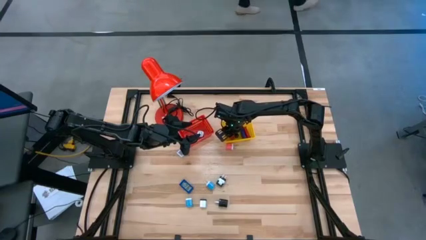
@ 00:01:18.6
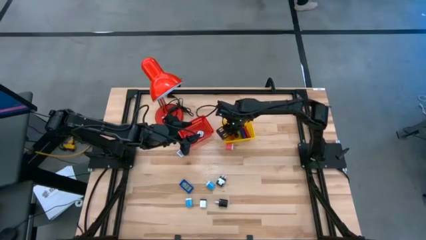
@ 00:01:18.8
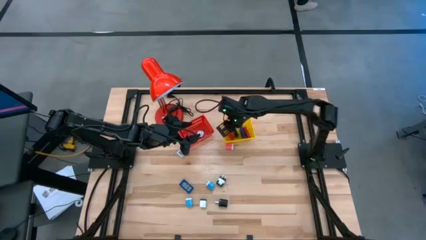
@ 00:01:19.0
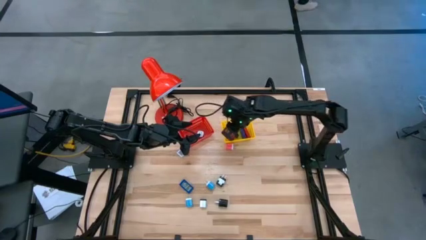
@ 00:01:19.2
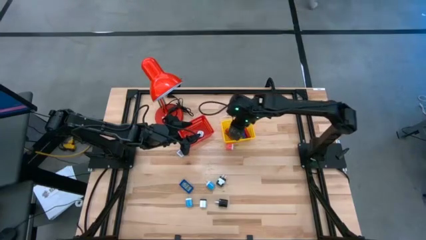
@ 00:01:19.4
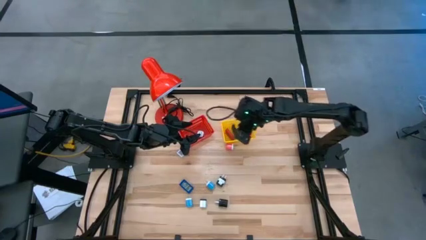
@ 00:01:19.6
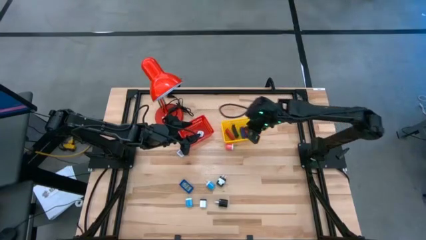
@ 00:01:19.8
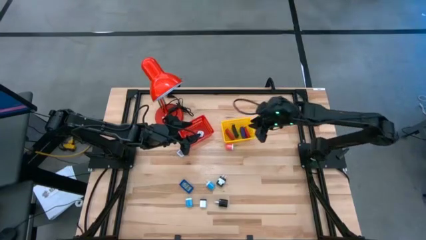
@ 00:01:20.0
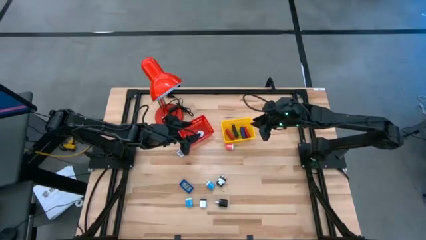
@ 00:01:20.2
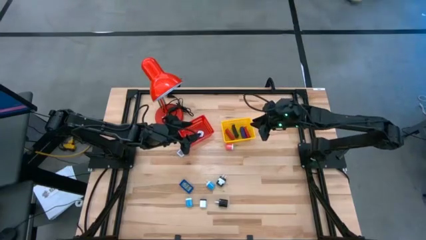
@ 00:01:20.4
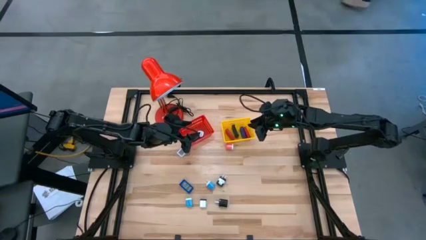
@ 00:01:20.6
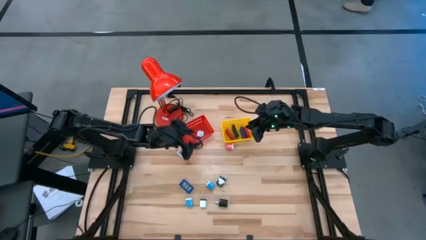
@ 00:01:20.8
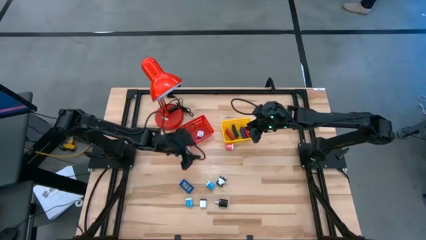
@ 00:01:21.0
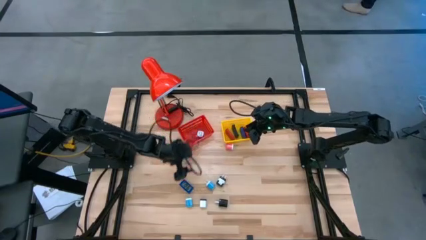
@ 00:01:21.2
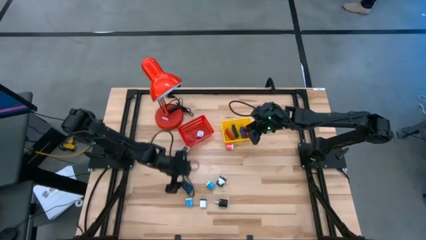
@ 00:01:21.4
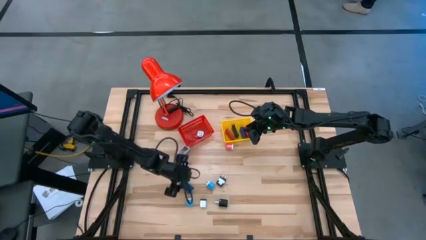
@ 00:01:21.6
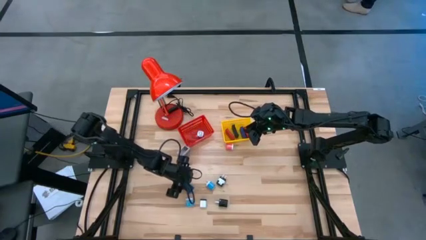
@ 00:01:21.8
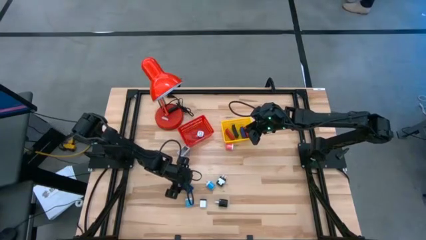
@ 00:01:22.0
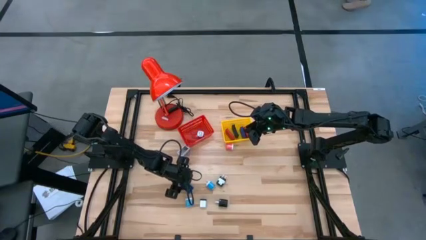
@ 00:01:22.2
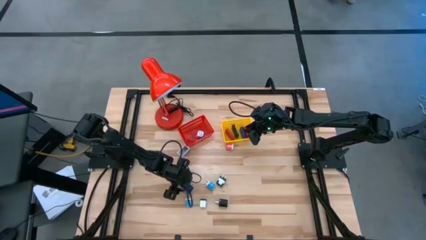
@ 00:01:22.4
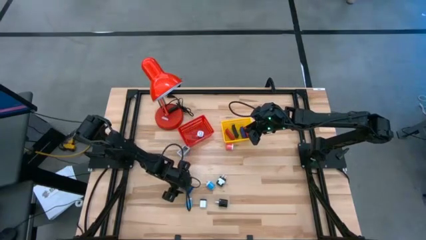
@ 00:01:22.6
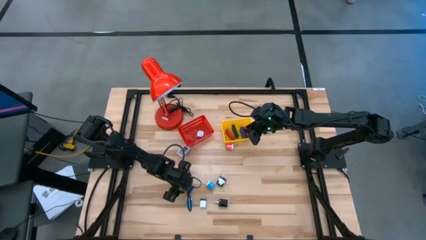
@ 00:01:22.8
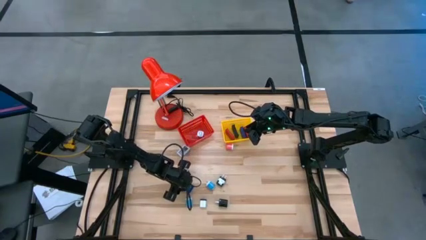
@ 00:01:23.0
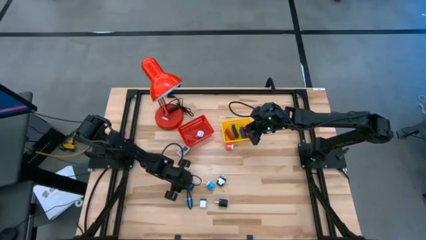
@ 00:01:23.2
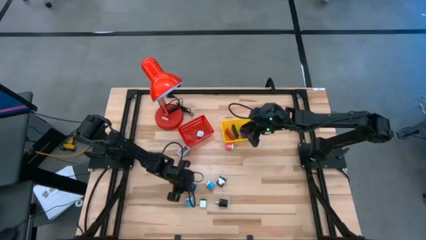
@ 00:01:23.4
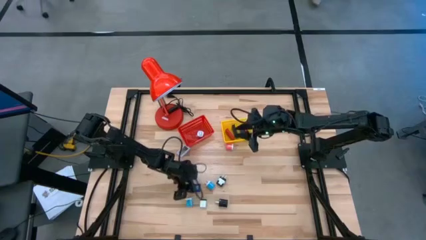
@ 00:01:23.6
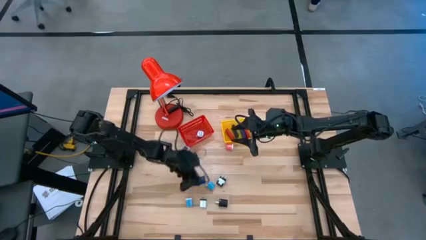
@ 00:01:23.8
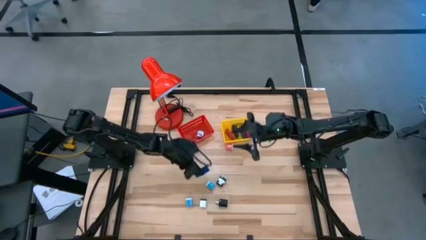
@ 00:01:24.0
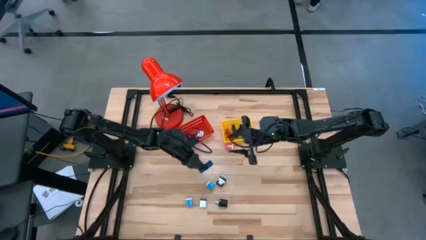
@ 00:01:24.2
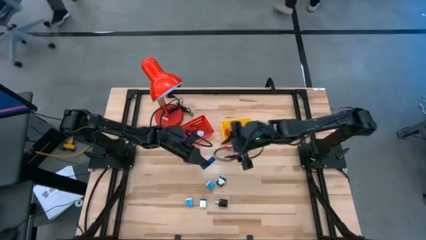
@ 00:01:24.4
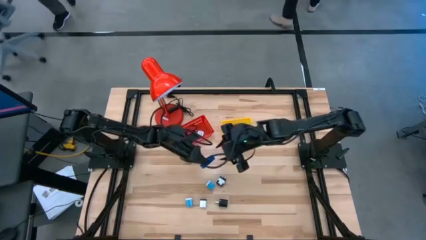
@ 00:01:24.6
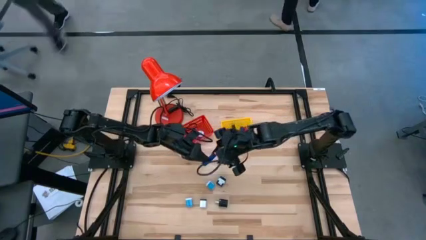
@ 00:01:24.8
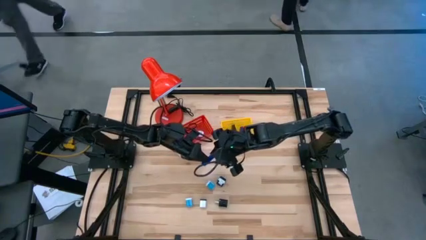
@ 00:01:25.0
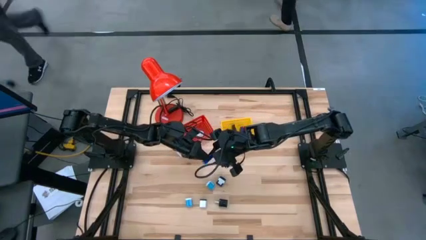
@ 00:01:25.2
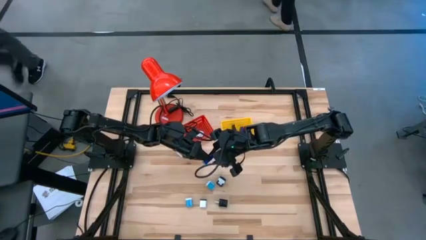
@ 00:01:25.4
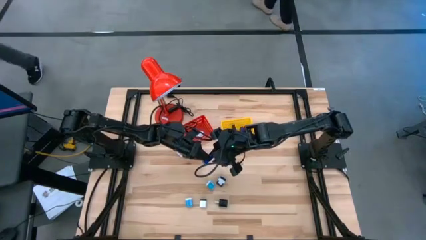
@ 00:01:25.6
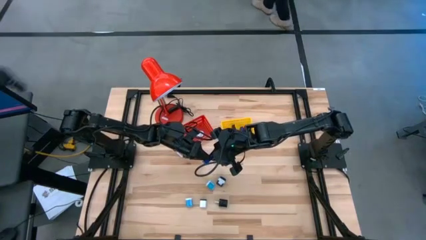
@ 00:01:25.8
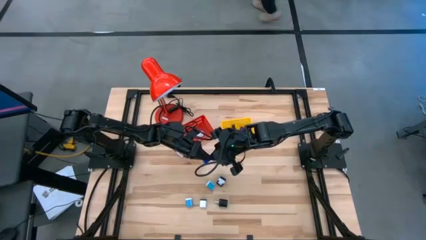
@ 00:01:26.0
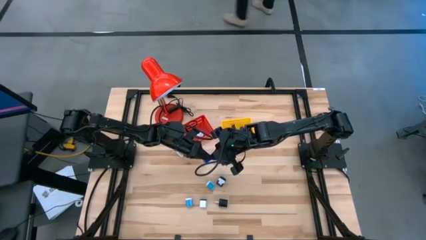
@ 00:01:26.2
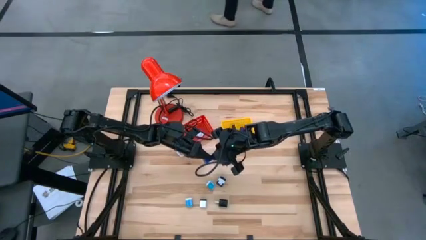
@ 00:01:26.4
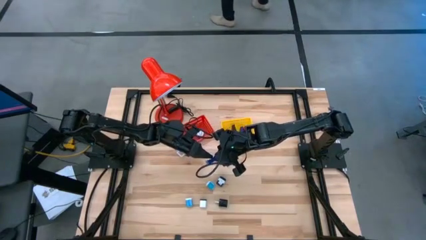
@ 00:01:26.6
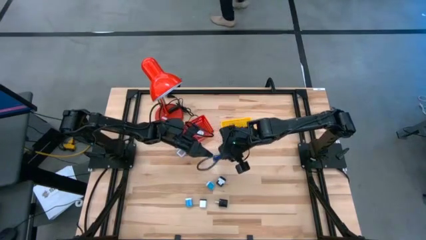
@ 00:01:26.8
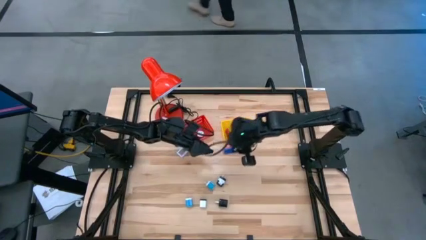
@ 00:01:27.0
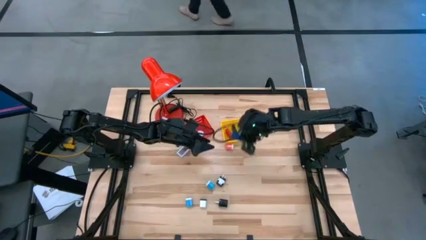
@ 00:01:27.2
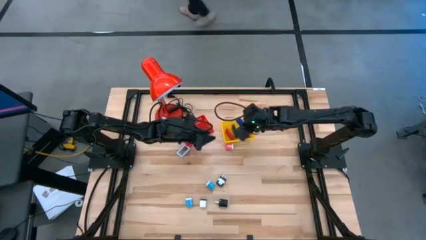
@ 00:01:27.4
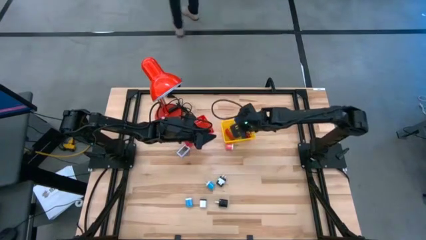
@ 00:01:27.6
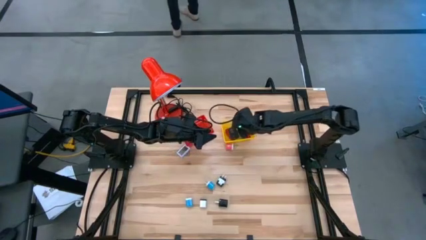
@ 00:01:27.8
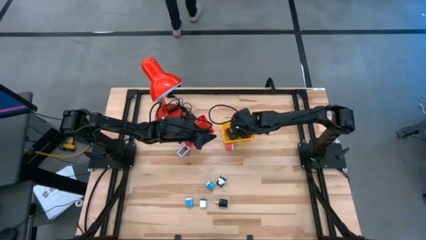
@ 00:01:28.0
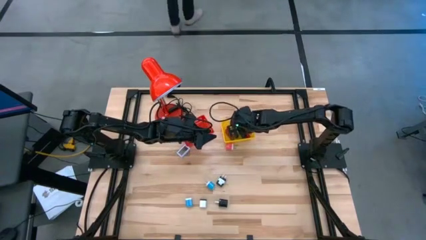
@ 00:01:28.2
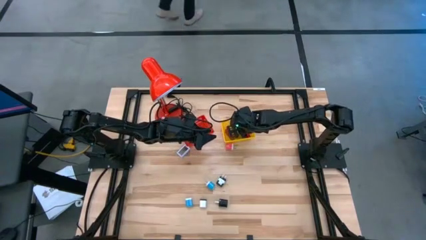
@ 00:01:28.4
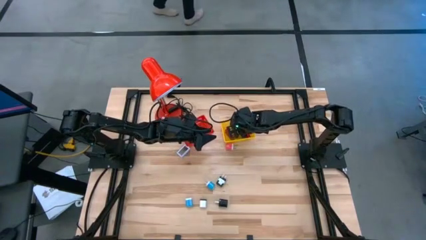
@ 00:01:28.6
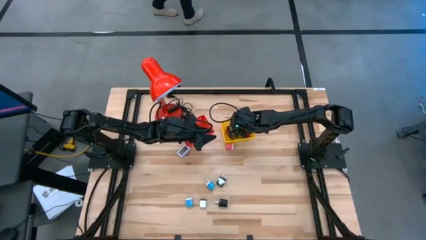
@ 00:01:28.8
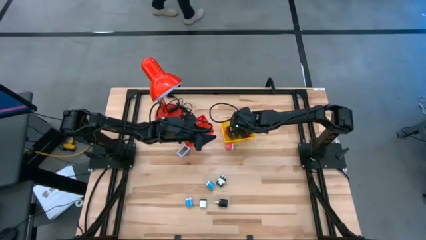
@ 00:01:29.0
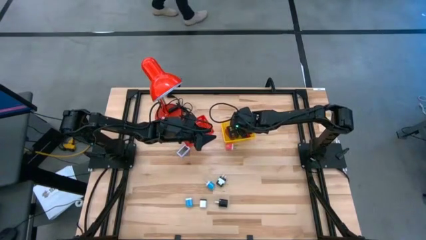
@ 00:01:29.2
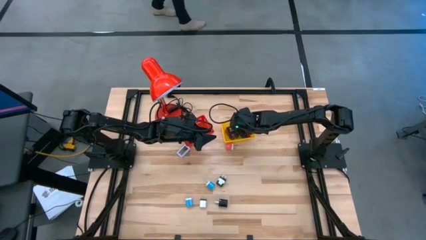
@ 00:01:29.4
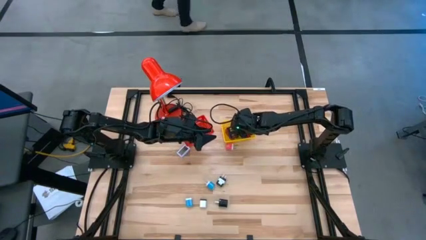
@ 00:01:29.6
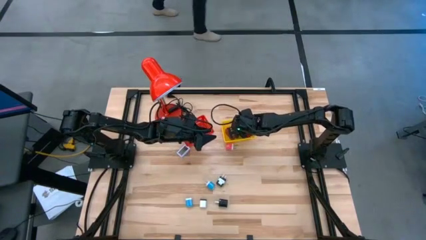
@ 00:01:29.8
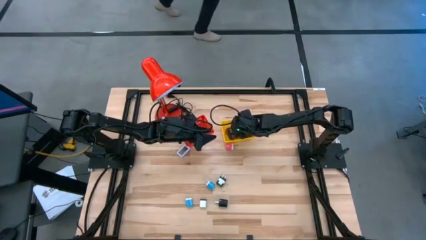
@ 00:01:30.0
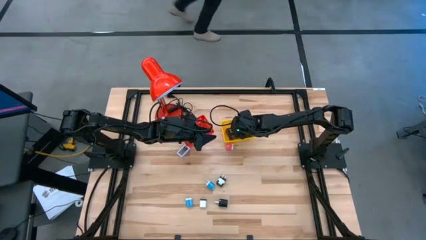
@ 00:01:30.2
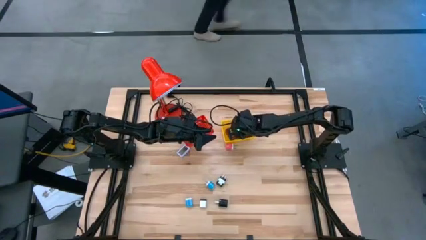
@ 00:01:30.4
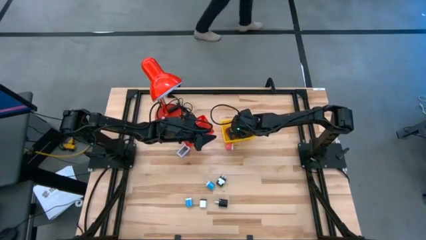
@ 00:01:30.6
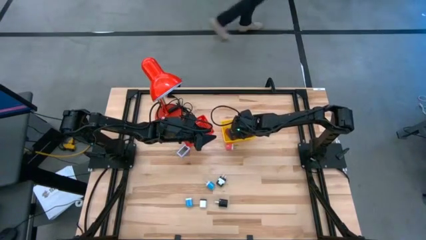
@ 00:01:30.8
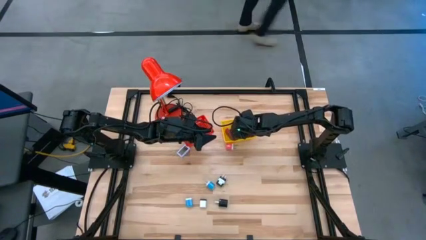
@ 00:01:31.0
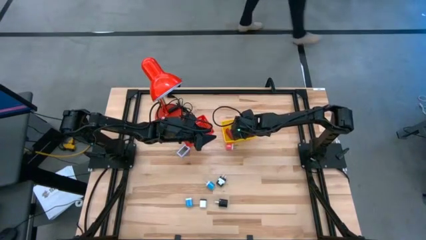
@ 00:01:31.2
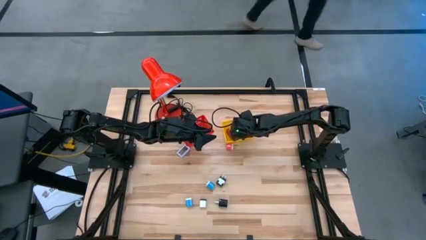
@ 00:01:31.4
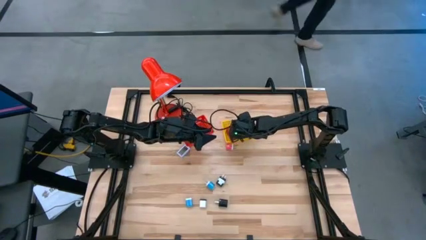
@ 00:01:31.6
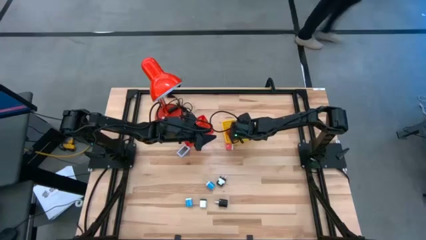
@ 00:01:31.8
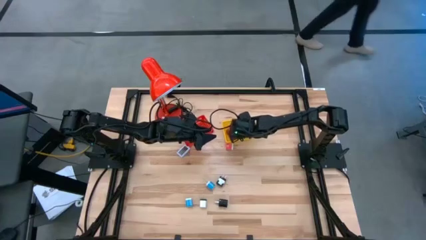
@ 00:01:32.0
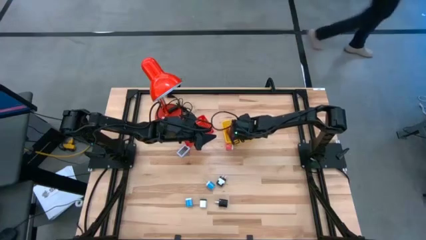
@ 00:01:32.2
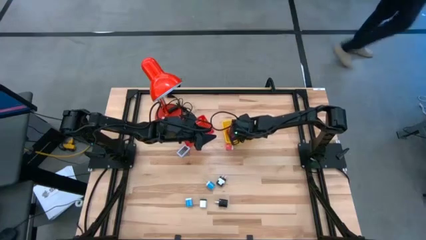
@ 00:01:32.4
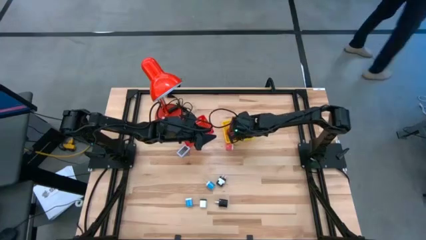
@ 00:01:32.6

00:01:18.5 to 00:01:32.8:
Task: Pick & Place Office items
Put the dark blue digital timer into the yellow bin

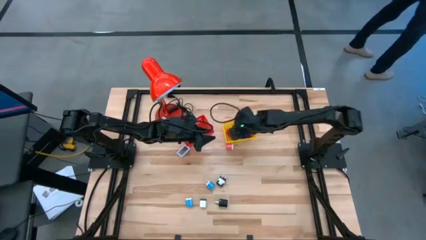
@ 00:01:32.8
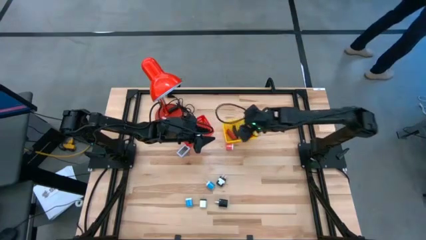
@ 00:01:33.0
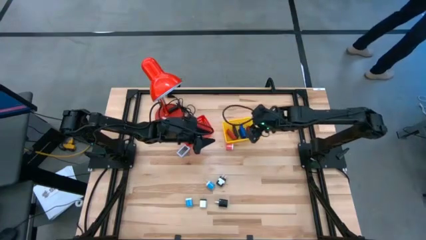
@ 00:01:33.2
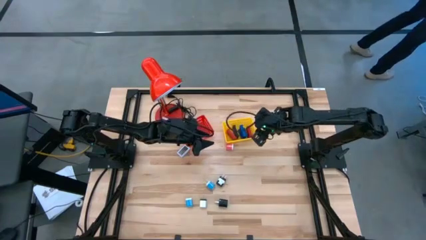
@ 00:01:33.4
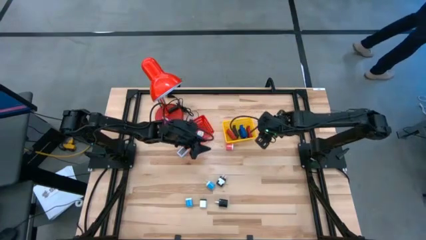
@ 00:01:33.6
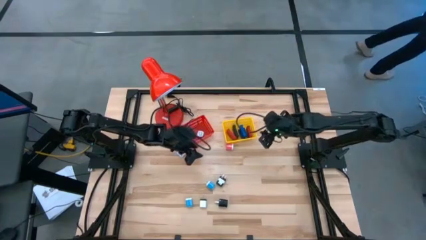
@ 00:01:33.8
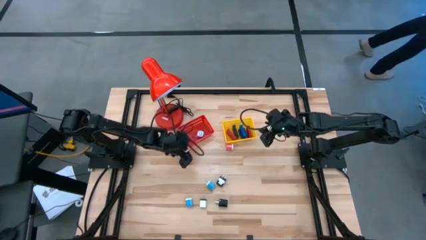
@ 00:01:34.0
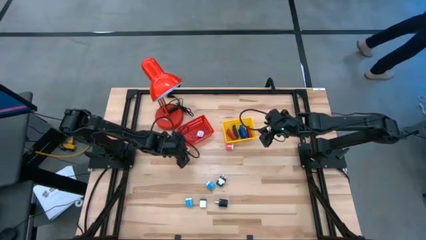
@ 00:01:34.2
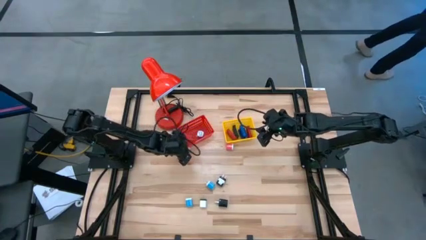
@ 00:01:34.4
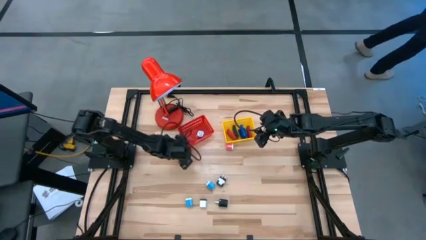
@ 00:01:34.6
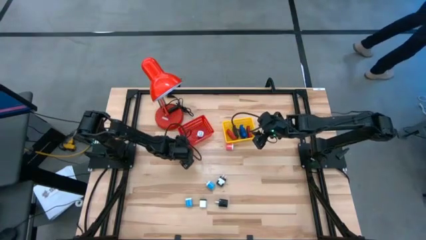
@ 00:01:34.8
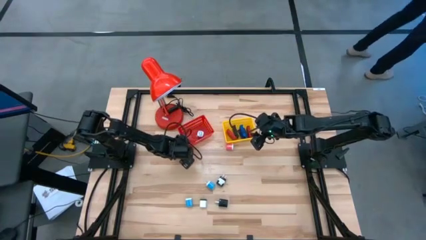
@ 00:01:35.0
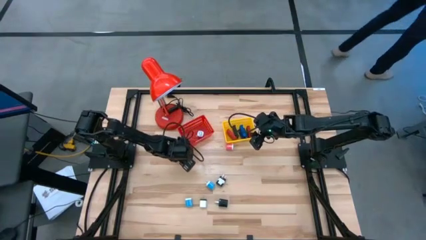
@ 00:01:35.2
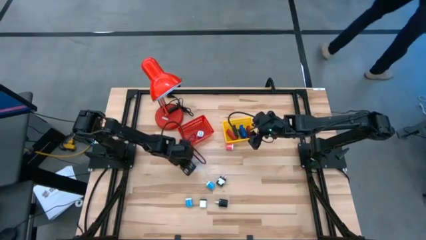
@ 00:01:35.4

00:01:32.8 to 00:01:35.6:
Put the white digital timer into the yellow bin
